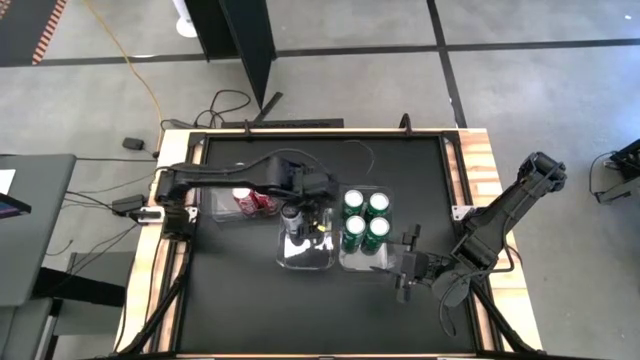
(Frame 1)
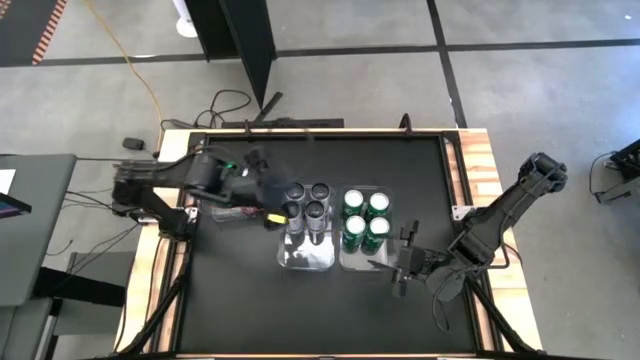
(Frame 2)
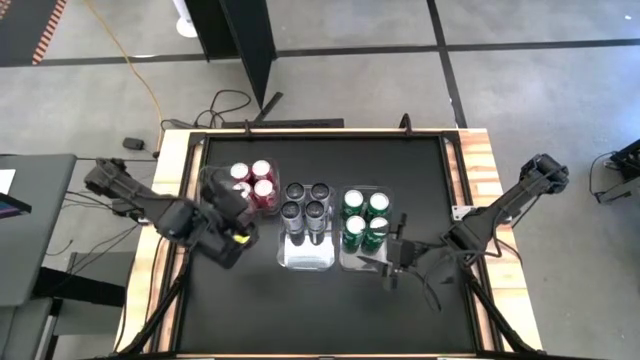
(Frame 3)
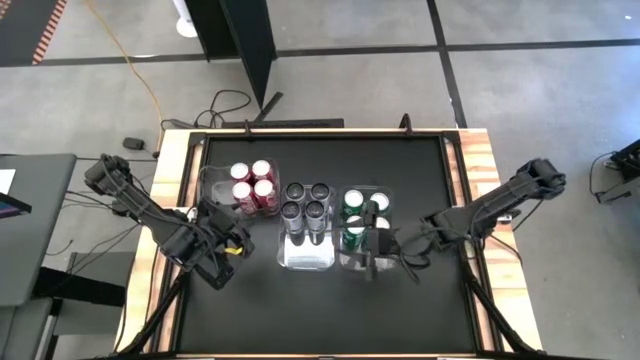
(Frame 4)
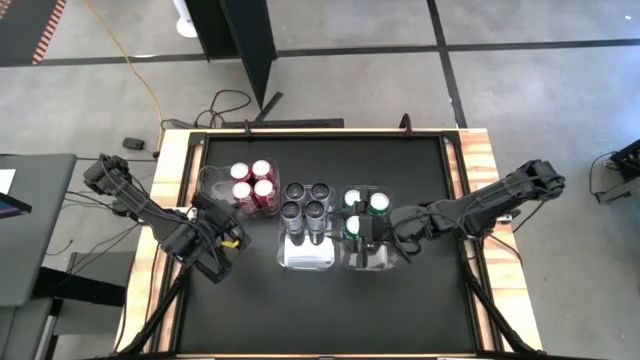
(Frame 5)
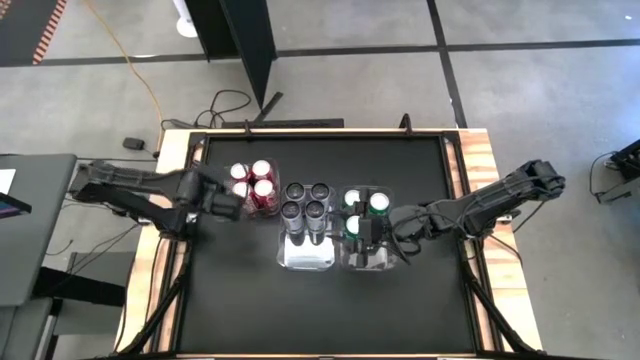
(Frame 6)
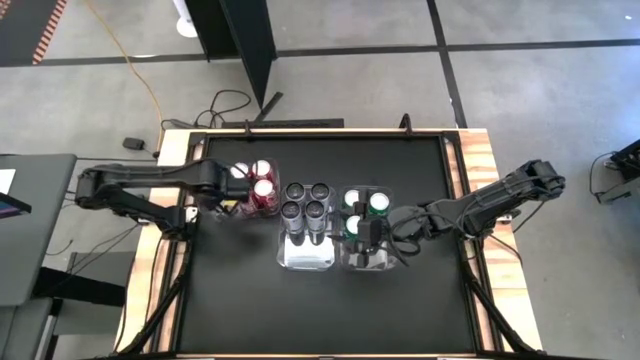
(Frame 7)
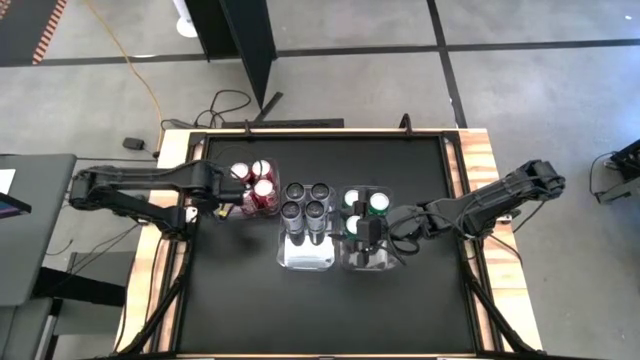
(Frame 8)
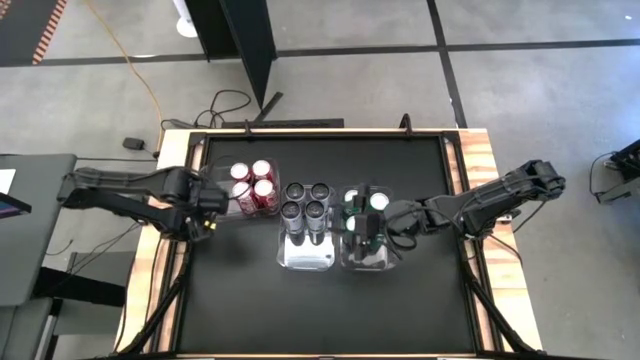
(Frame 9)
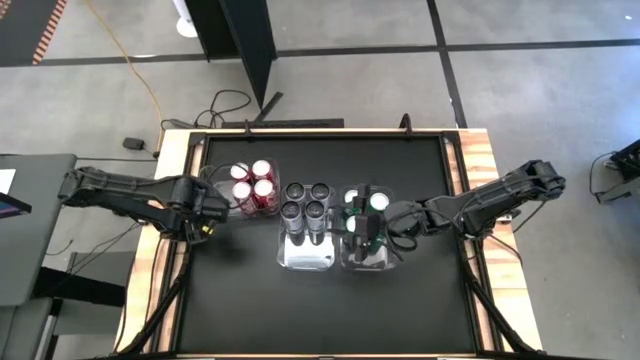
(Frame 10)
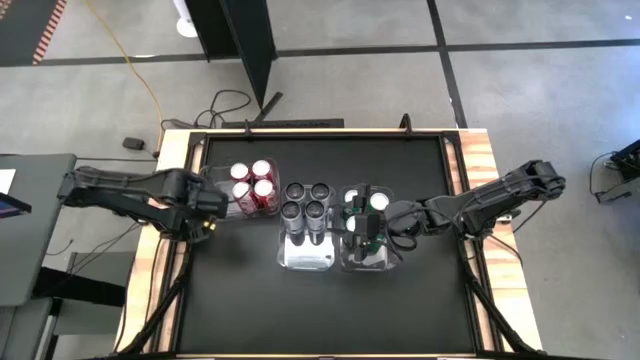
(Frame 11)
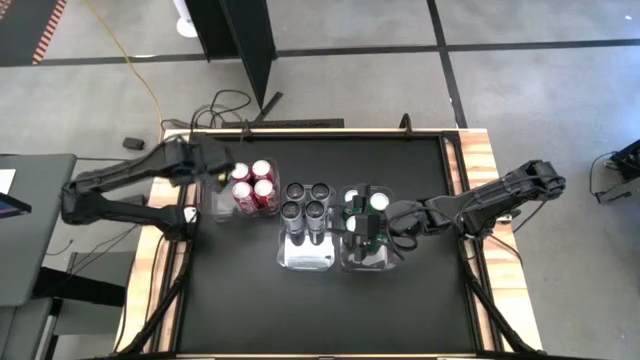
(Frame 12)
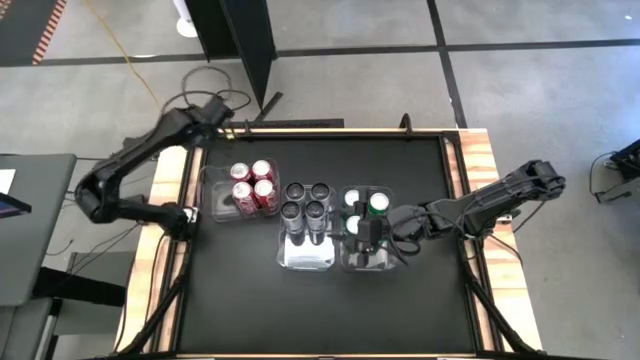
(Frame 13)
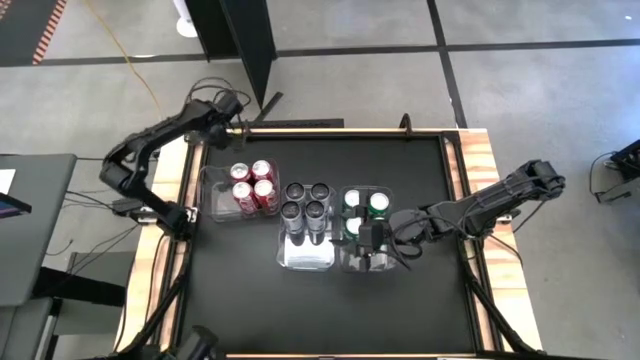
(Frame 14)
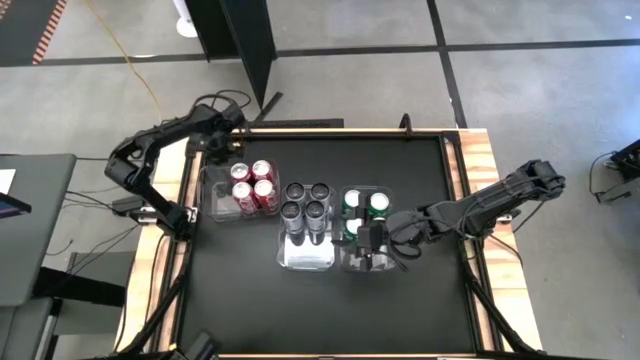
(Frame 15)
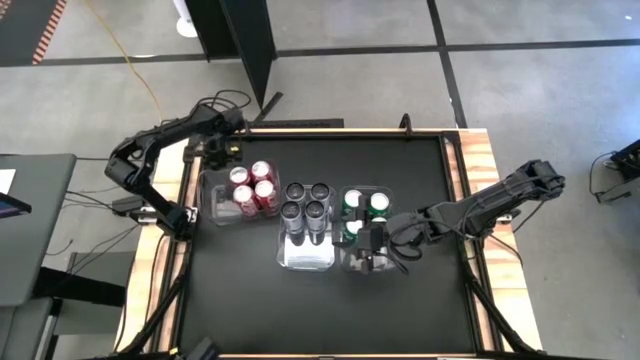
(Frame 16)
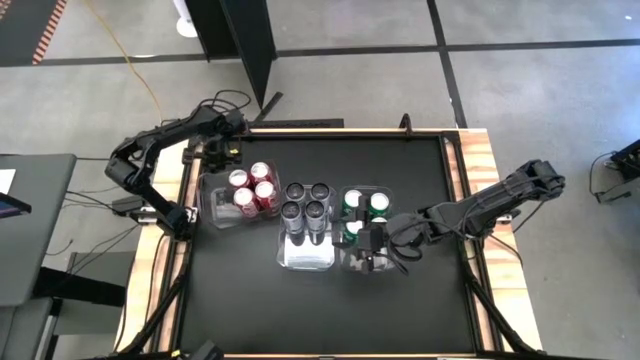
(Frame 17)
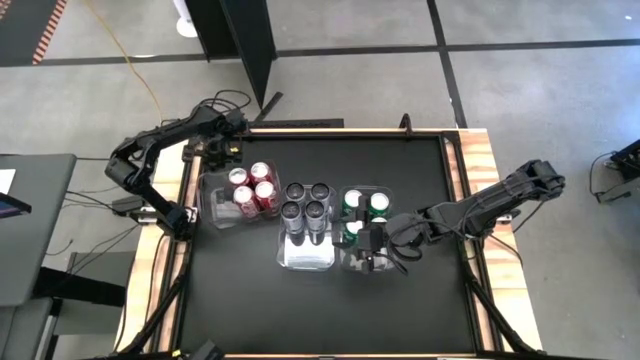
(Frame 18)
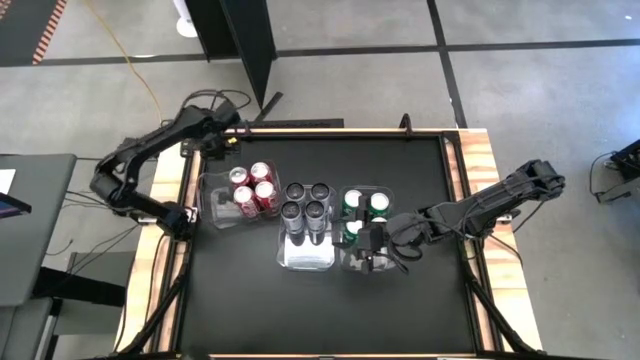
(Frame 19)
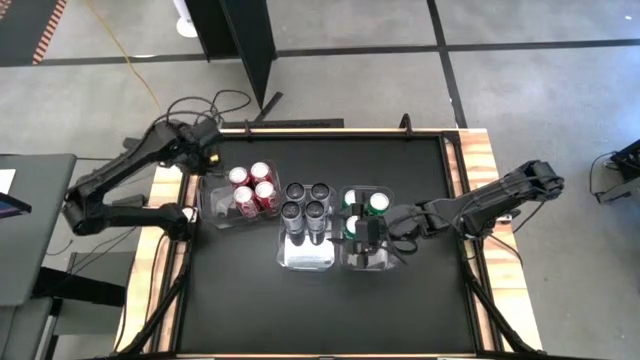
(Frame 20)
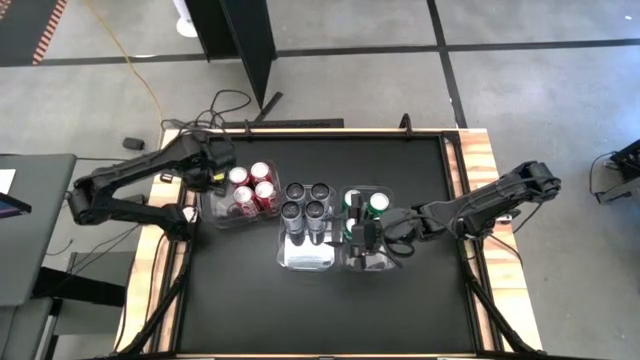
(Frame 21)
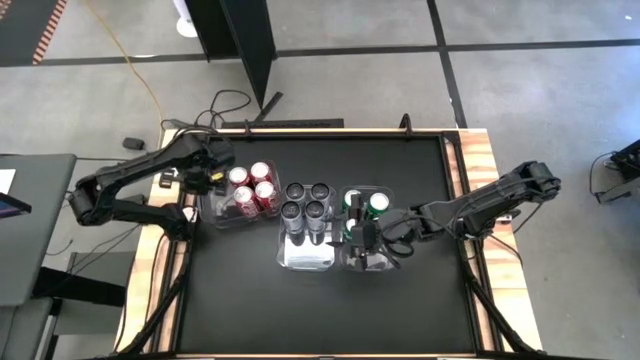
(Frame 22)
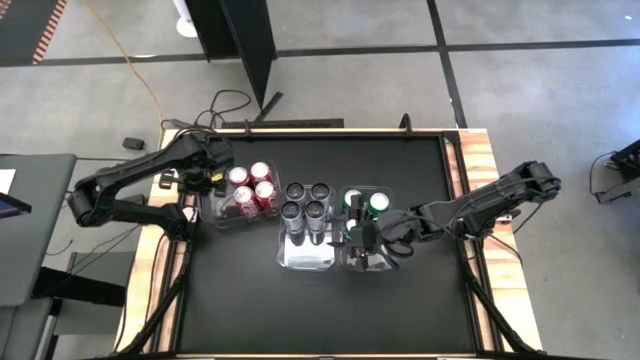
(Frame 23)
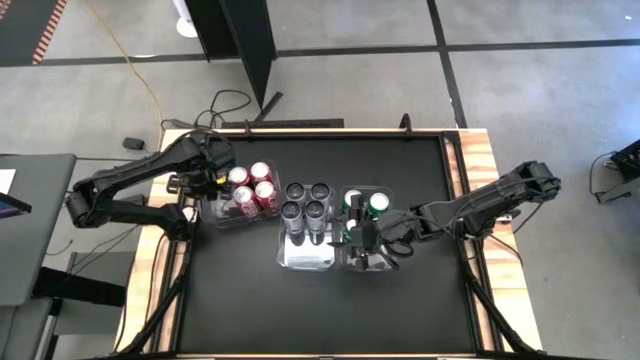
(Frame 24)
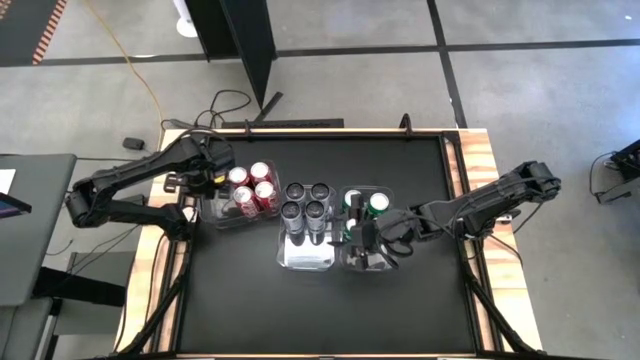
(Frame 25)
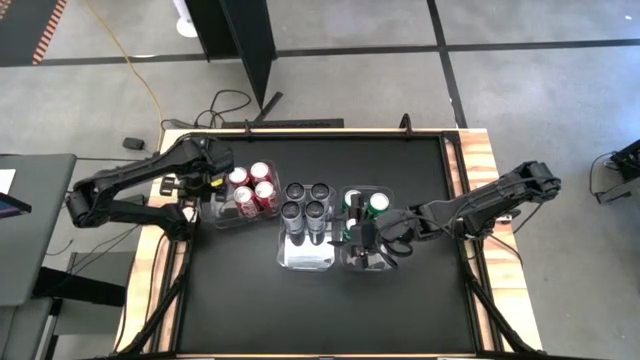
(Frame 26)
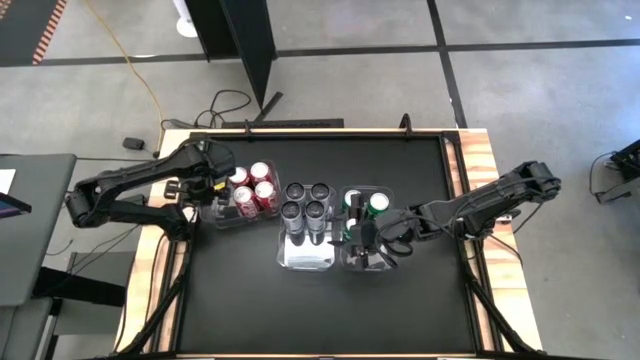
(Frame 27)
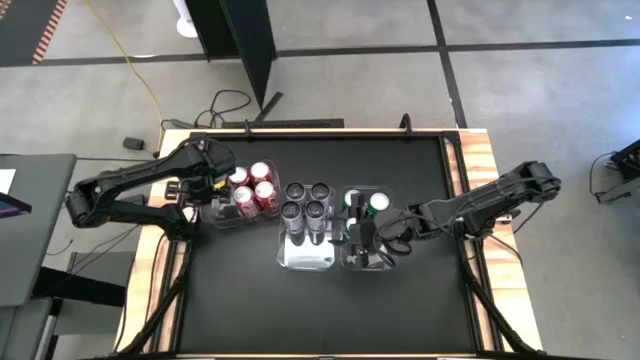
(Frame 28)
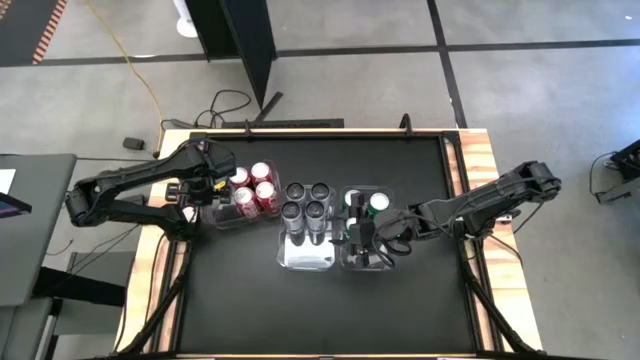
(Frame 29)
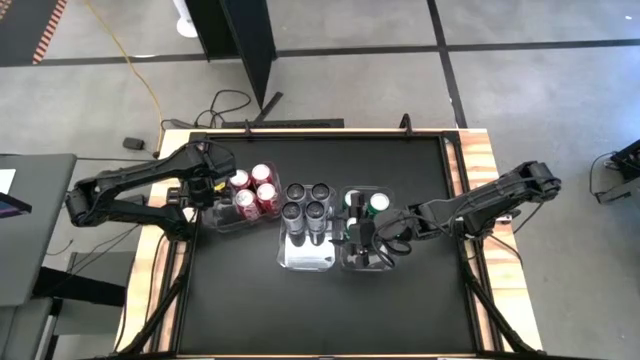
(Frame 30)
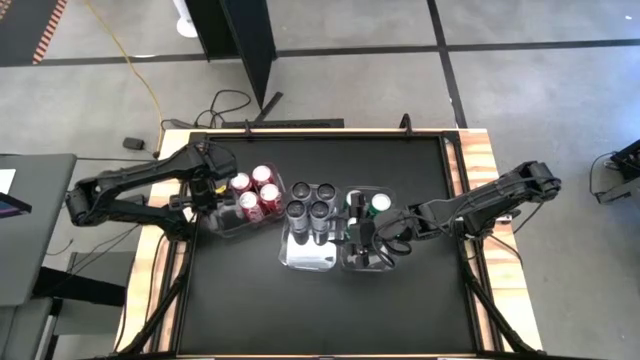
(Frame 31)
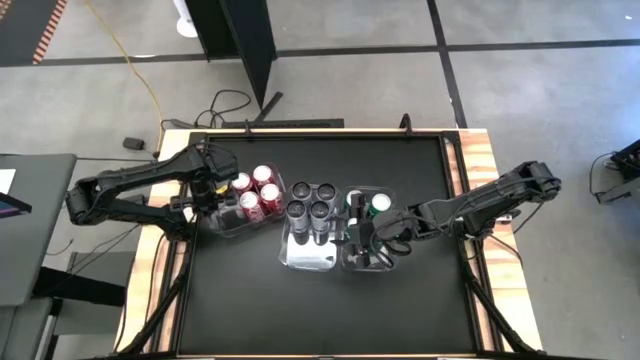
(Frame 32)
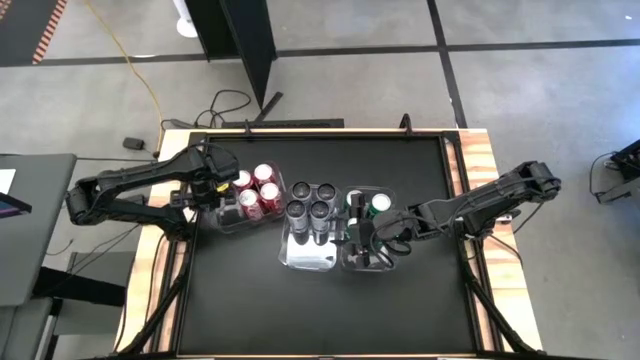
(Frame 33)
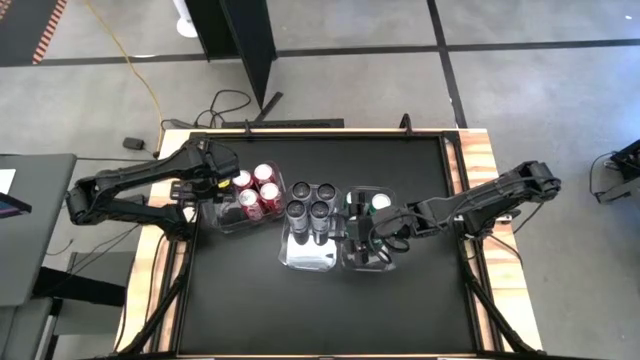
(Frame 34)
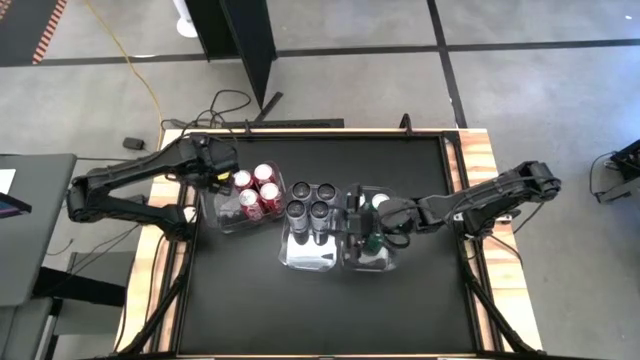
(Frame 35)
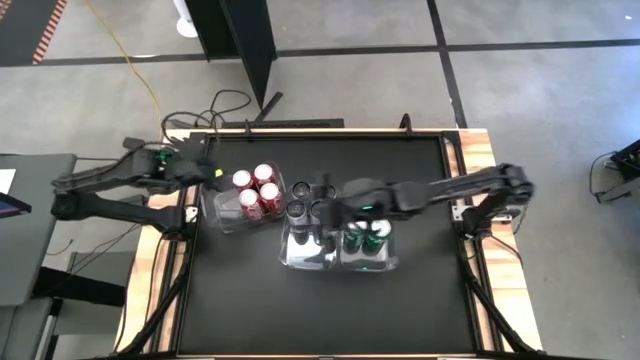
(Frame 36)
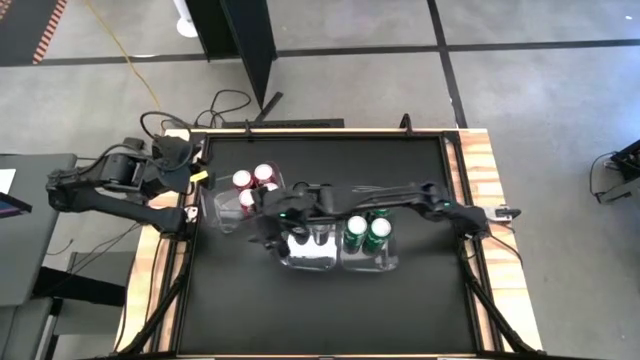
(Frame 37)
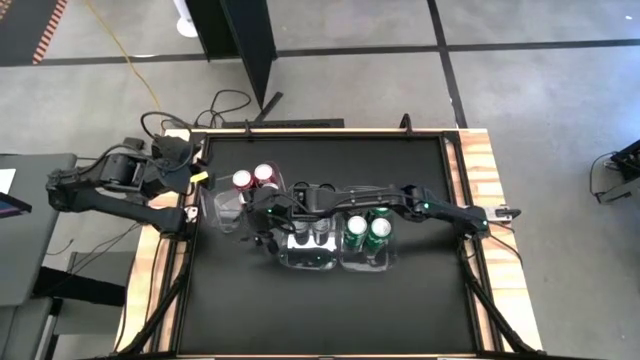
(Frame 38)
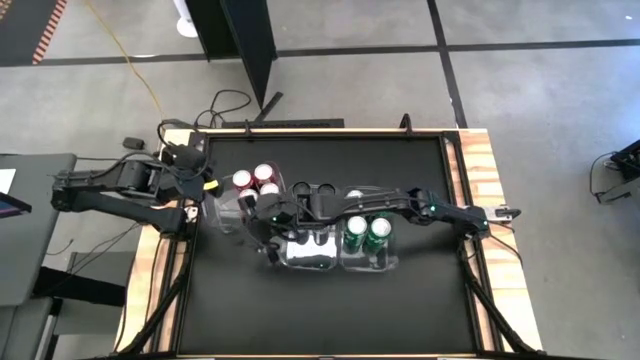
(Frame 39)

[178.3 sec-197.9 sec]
Task: Sort soda cans
Adjust the left transparent bin

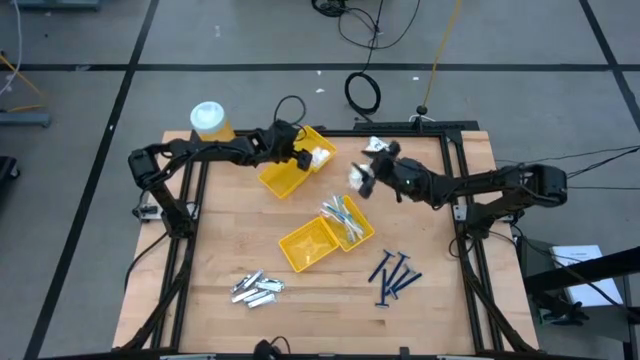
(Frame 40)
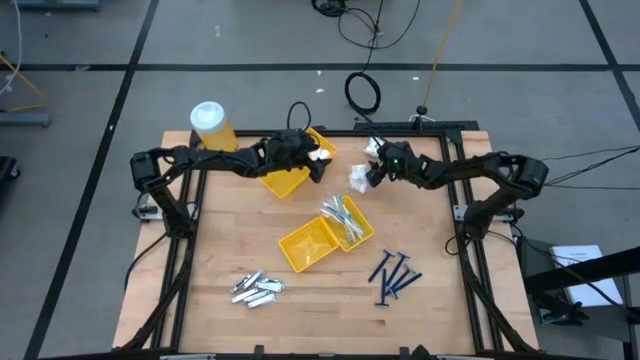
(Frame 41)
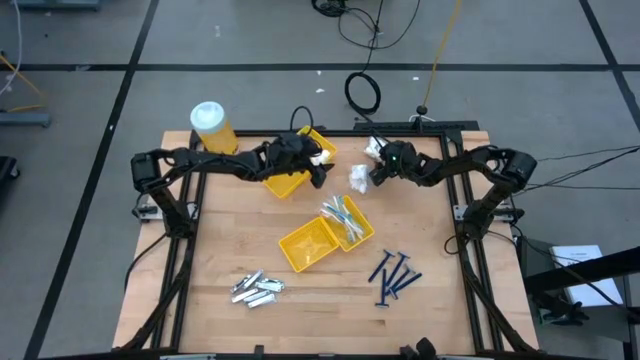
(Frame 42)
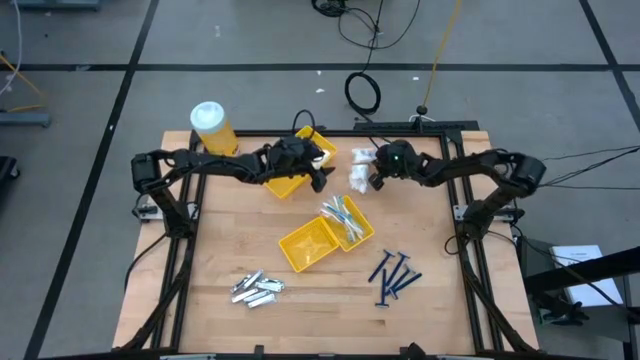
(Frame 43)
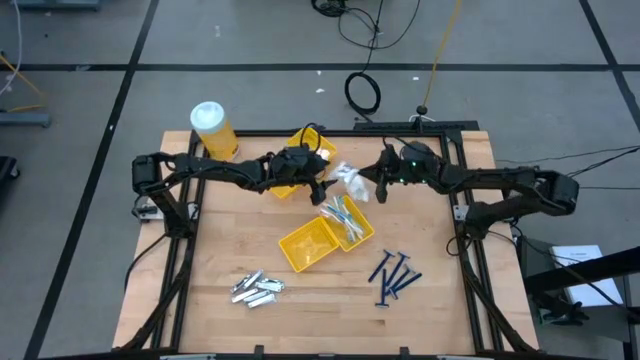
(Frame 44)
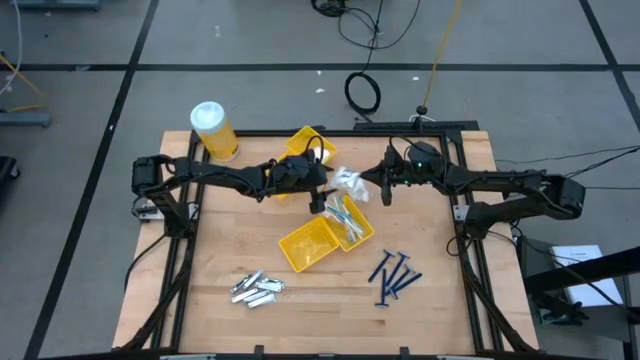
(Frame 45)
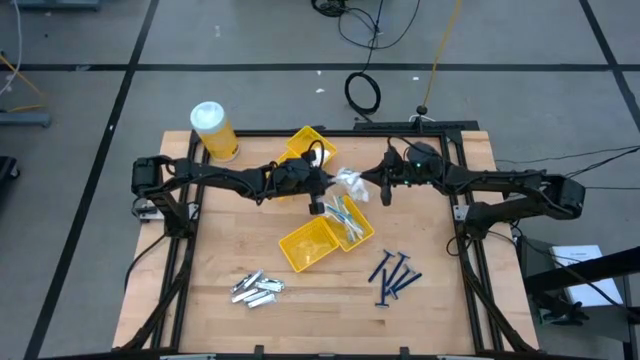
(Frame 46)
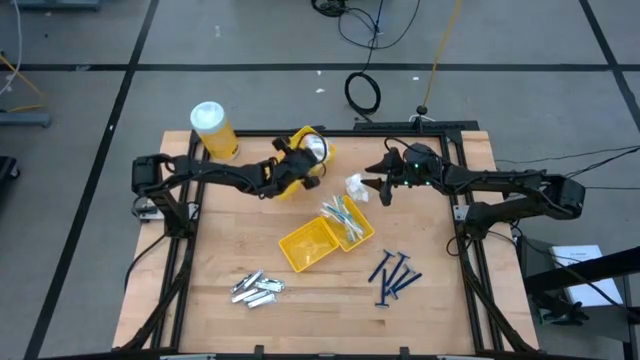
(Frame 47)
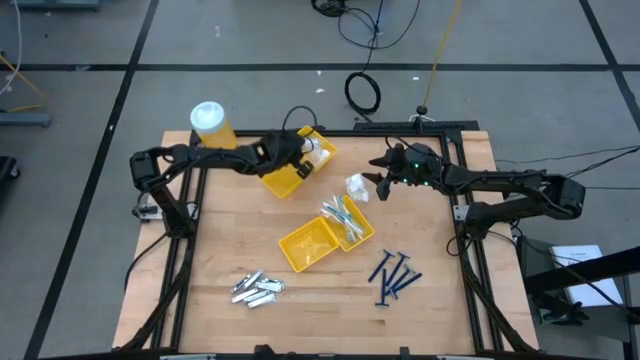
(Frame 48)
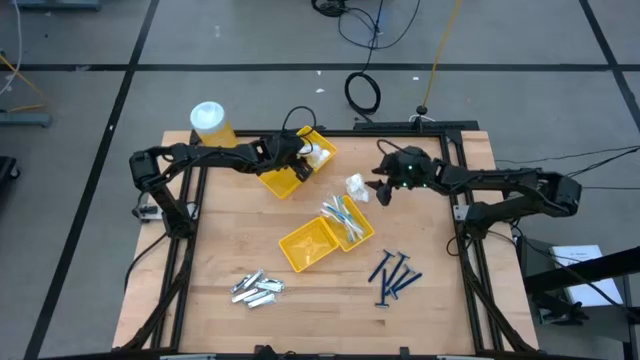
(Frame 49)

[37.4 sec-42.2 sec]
Task: Pick & Place Travel size toiletries
Put the cotton pack into the top right yellow basket
